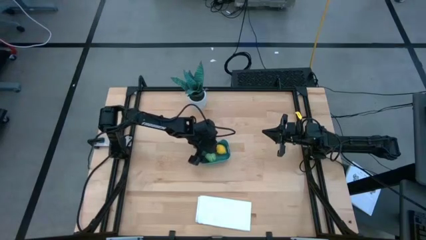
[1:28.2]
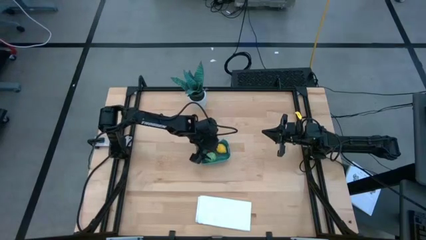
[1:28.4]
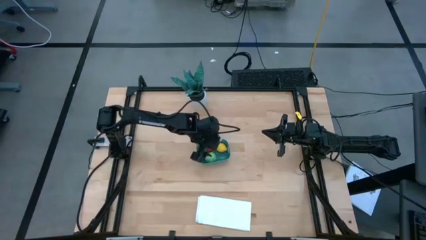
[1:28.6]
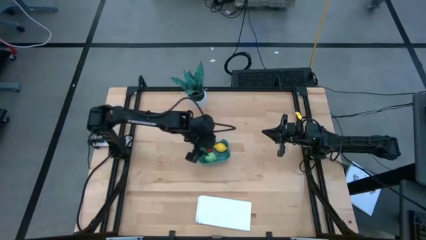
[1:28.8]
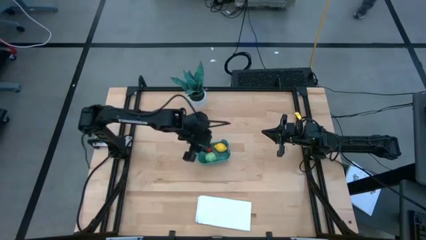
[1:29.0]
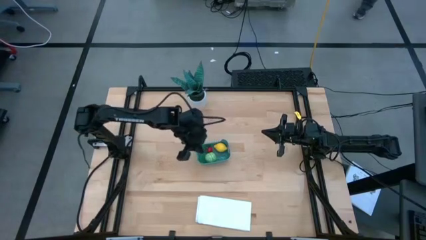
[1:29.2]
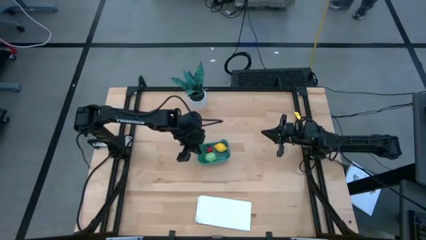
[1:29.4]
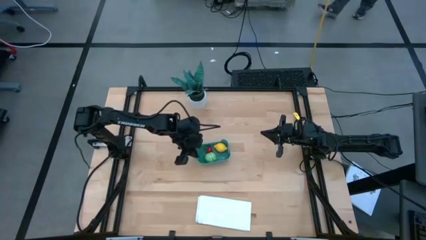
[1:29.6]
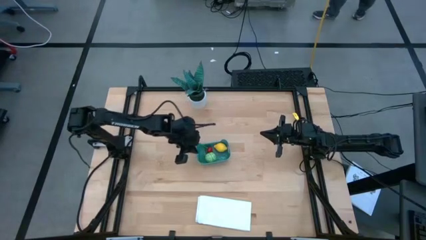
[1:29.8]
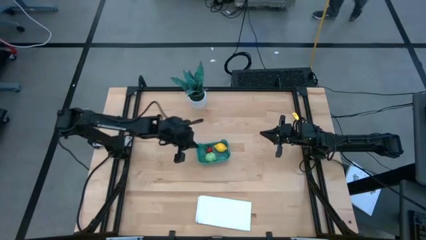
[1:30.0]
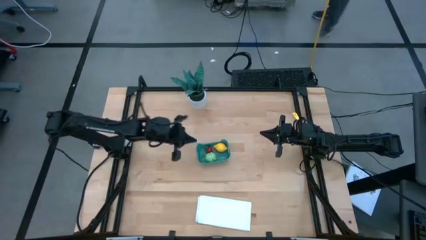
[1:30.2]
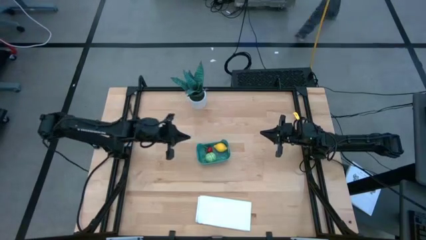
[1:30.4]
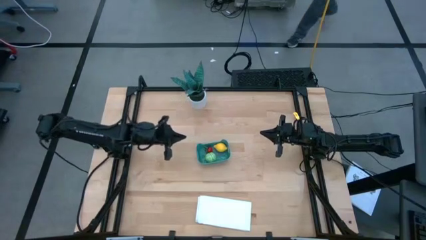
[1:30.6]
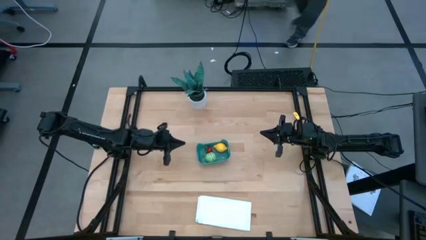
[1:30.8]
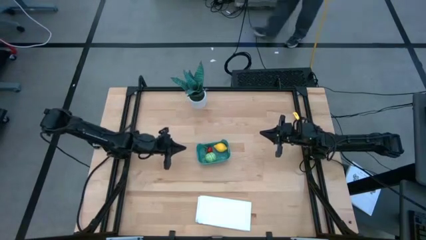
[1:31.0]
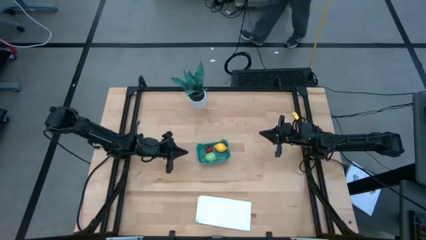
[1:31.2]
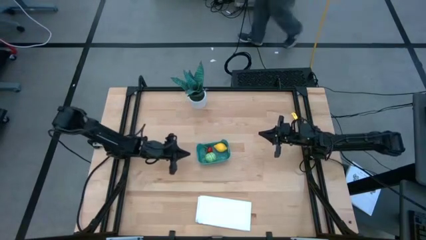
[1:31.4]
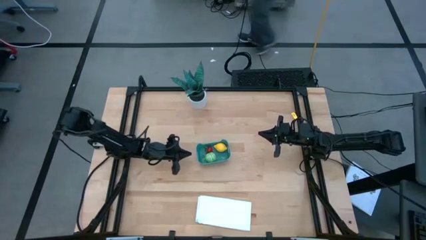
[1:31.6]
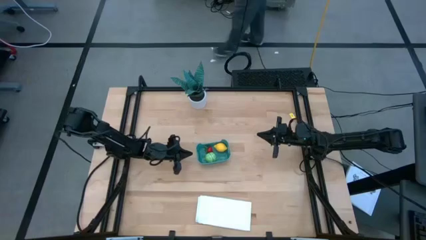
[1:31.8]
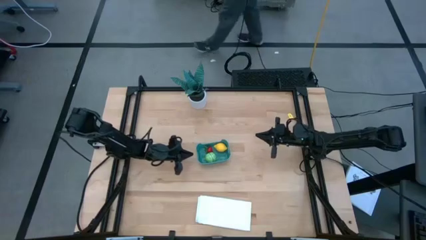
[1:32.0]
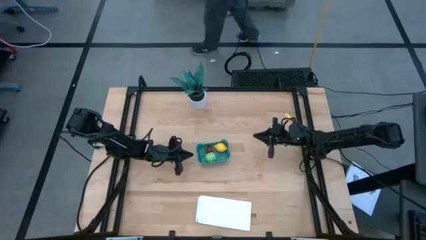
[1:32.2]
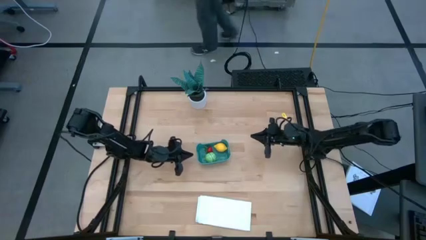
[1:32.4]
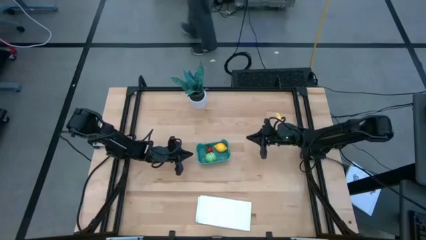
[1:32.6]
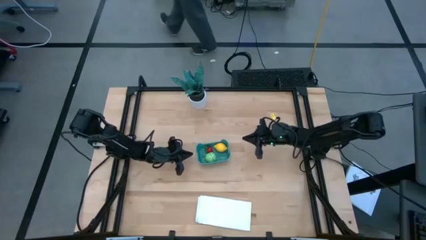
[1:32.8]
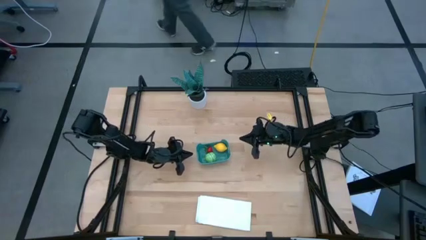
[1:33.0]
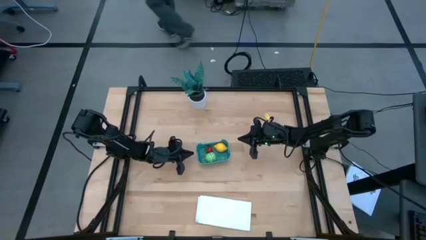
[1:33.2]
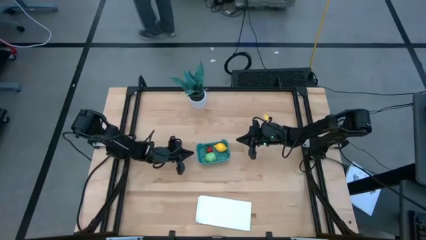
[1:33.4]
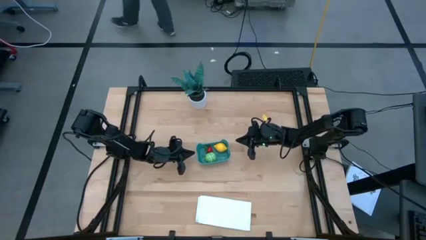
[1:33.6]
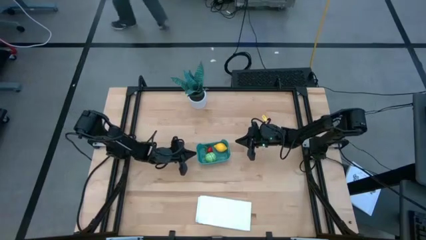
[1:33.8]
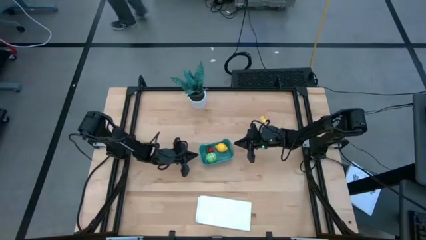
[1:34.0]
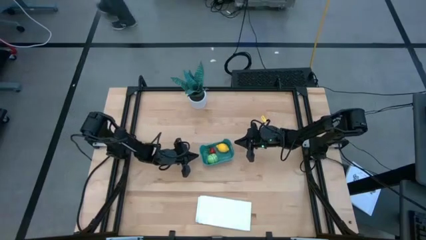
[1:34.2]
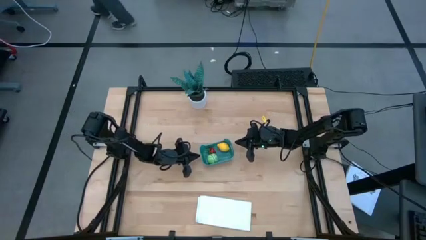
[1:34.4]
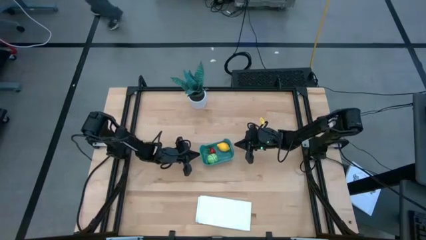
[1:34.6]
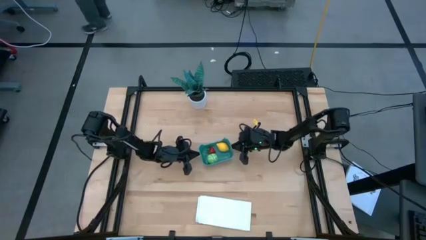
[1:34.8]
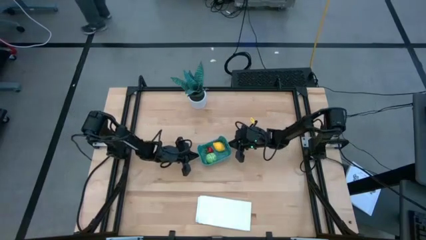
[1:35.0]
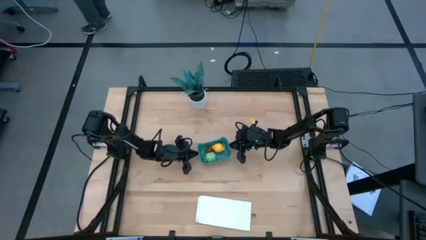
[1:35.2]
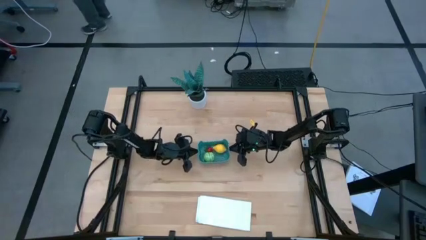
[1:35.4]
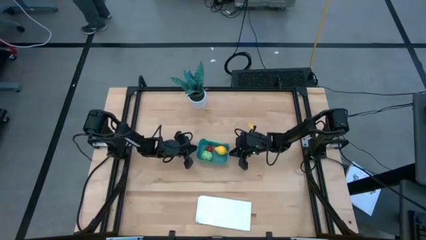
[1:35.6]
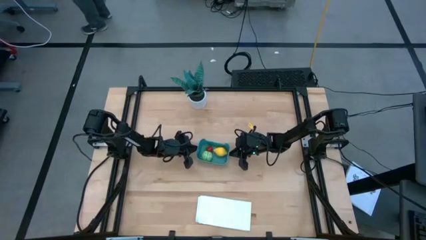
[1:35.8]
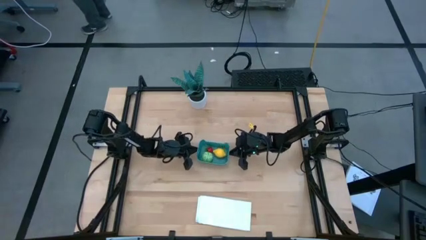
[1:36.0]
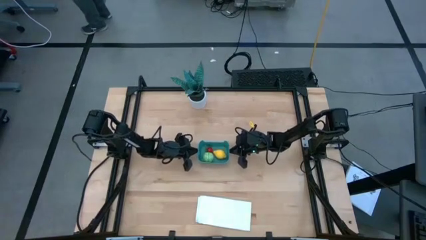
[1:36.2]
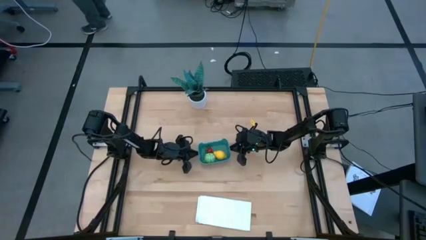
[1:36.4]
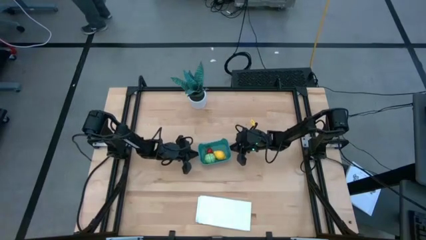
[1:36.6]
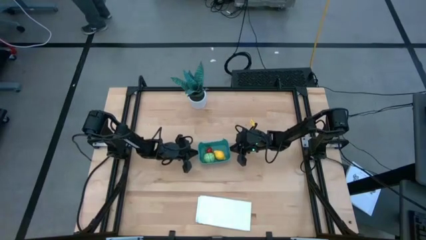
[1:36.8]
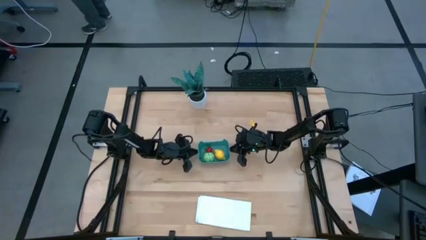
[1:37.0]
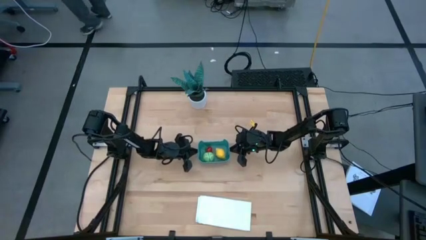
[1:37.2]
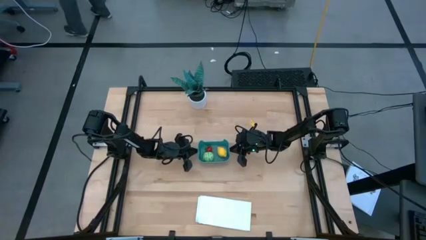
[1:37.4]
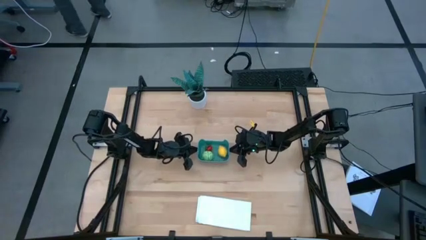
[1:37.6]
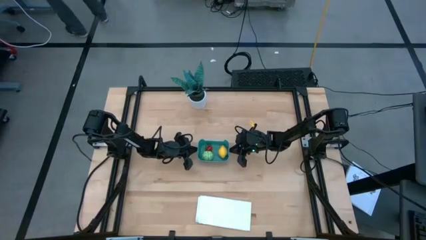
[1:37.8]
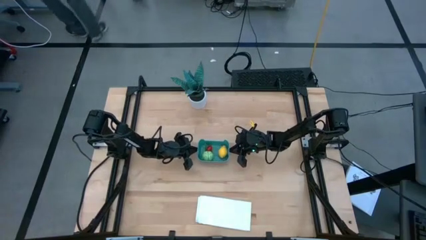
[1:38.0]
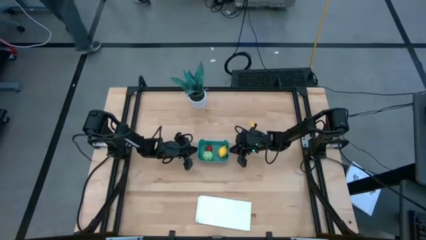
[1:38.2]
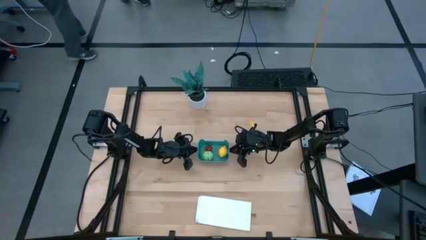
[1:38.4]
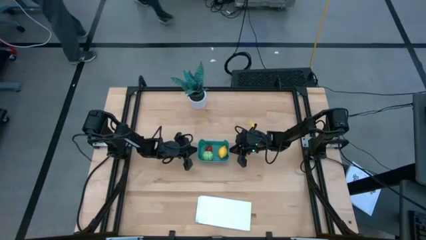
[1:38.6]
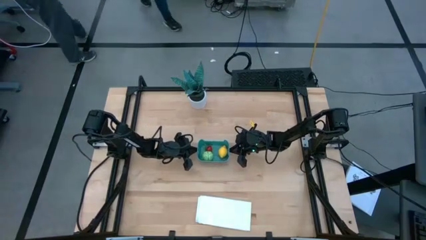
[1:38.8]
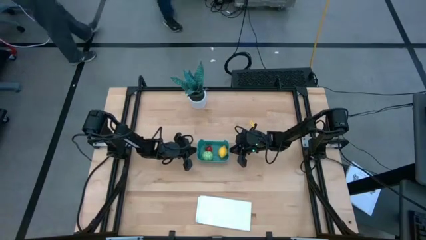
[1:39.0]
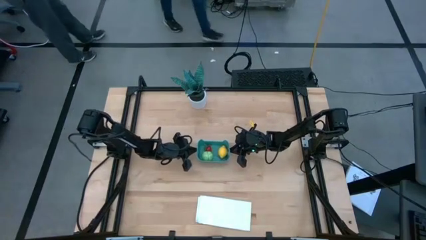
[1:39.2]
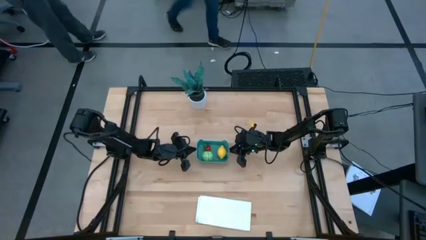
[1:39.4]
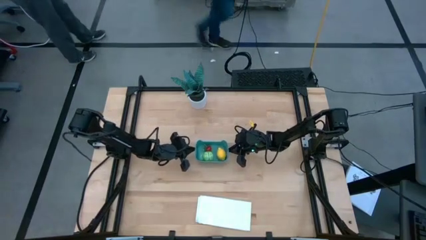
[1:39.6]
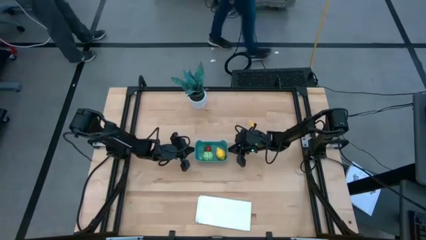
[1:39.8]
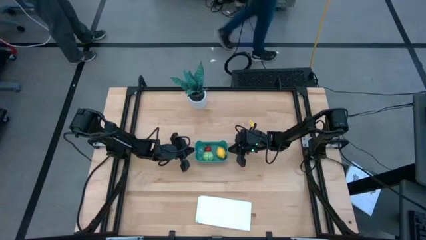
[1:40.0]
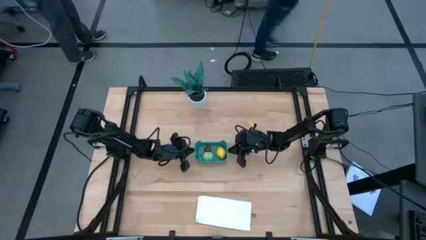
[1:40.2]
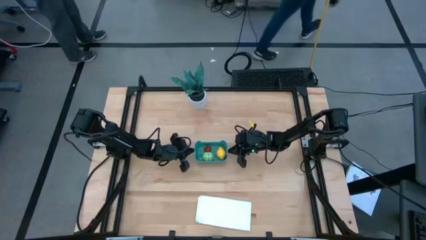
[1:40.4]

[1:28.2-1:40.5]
Task: Pick and placing Produce into tupperware
Adjust the blue container
